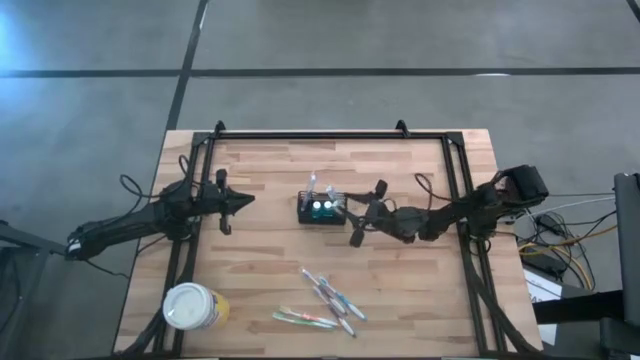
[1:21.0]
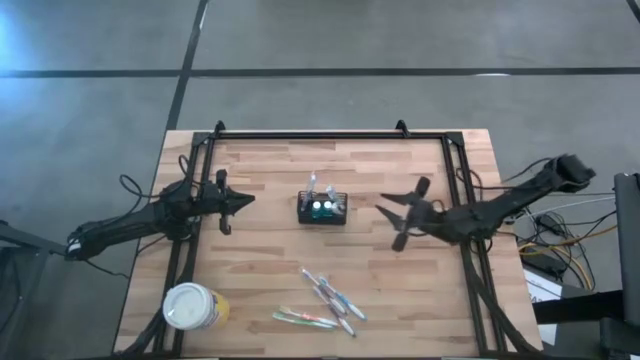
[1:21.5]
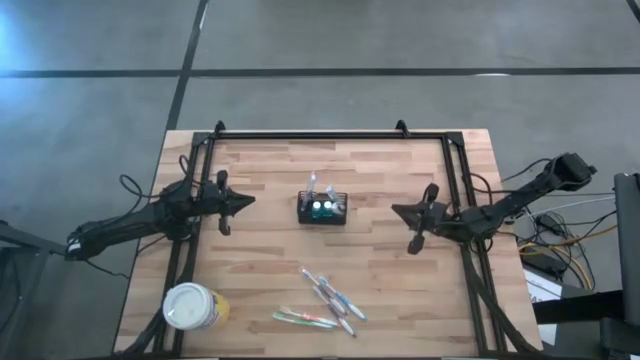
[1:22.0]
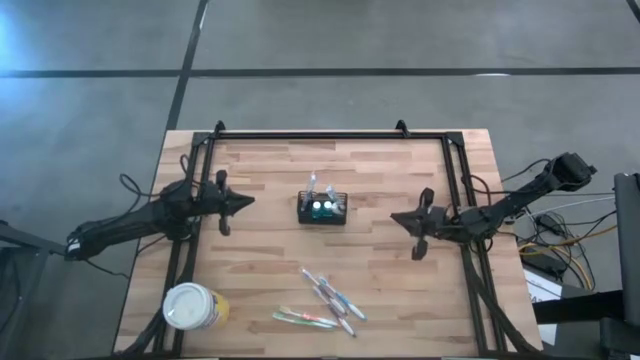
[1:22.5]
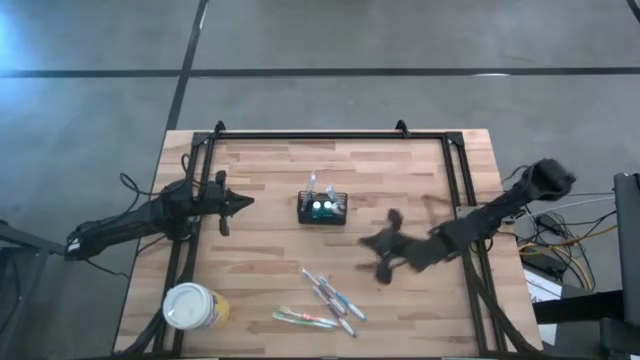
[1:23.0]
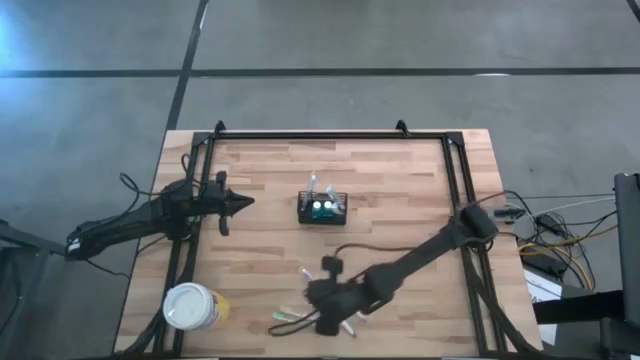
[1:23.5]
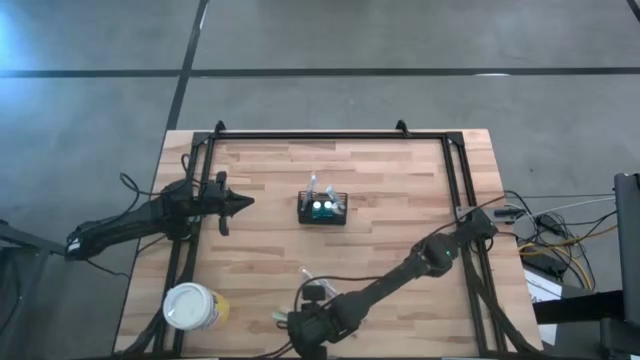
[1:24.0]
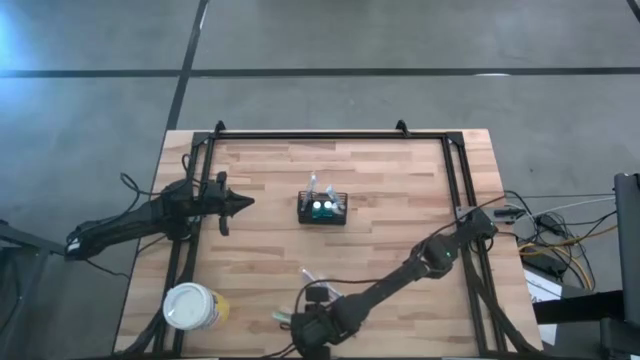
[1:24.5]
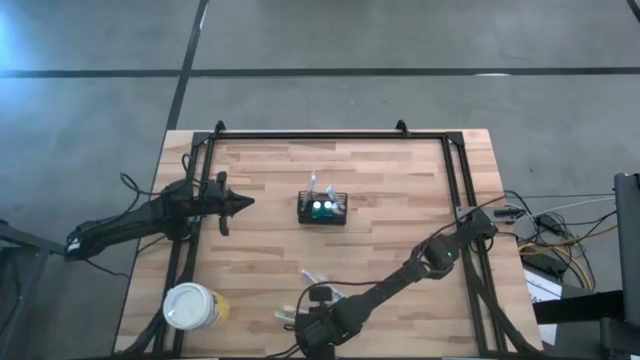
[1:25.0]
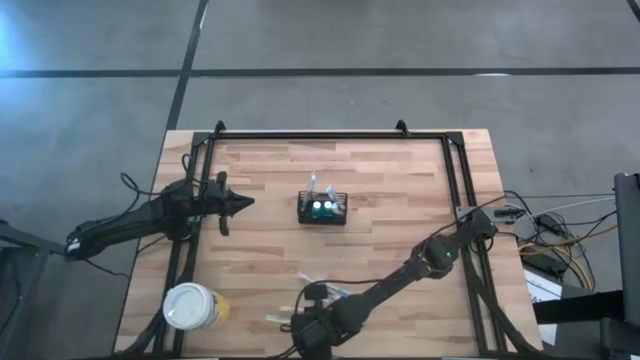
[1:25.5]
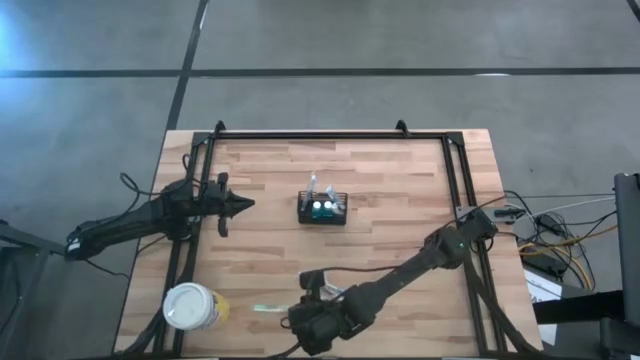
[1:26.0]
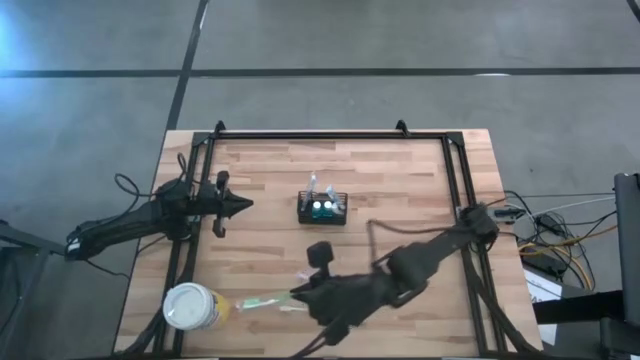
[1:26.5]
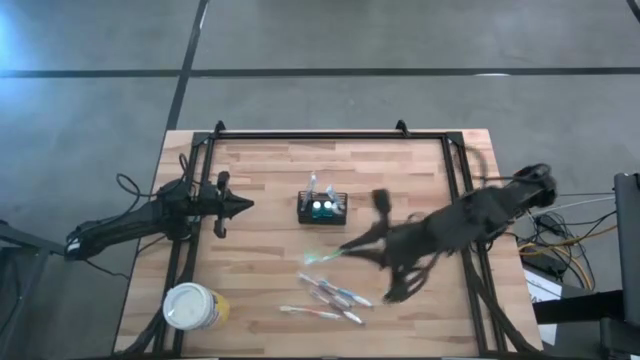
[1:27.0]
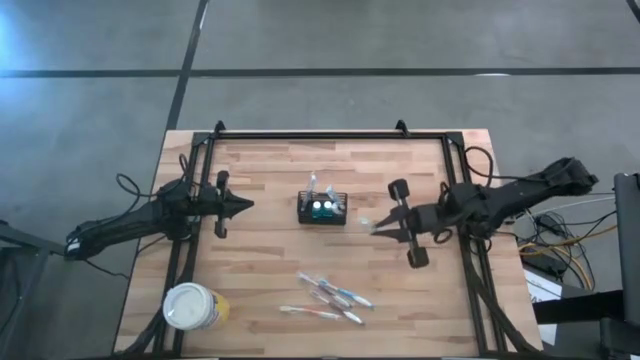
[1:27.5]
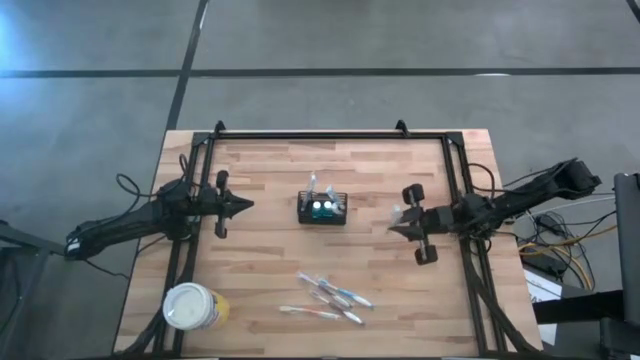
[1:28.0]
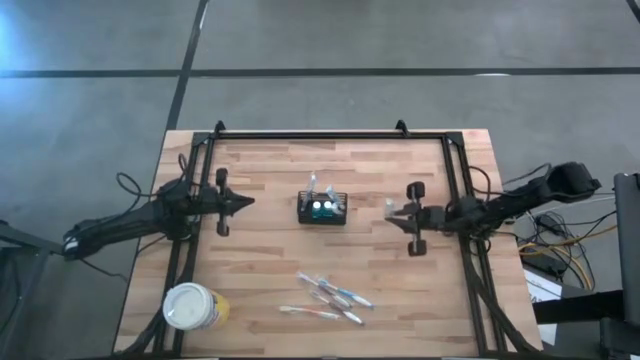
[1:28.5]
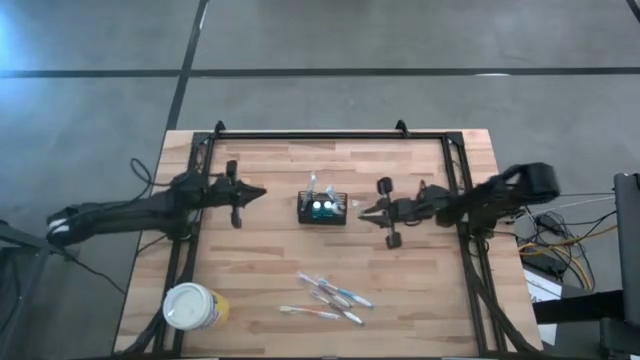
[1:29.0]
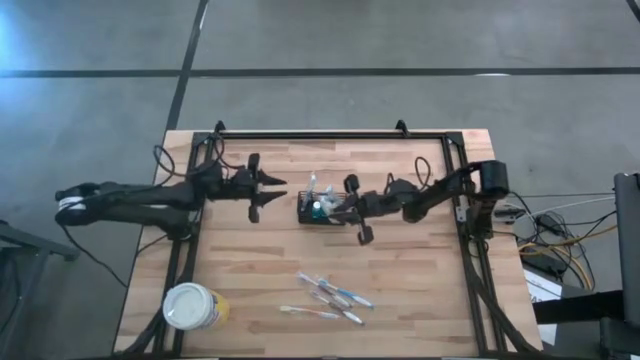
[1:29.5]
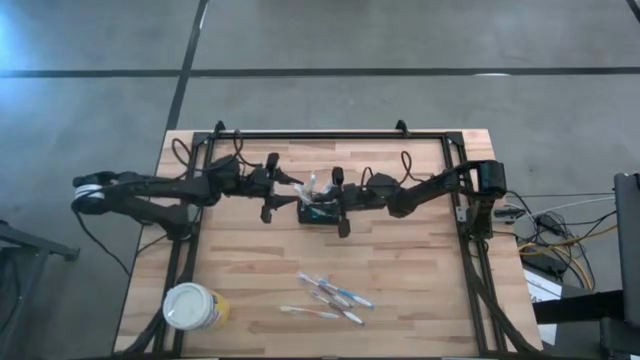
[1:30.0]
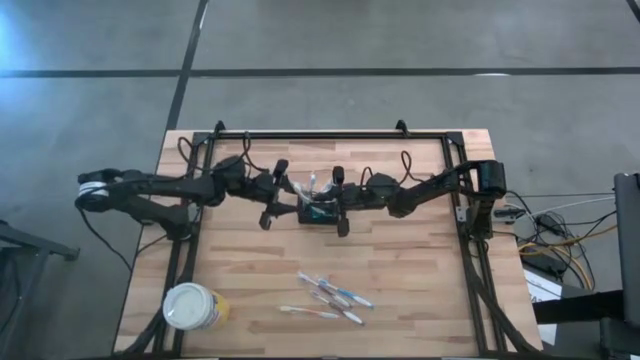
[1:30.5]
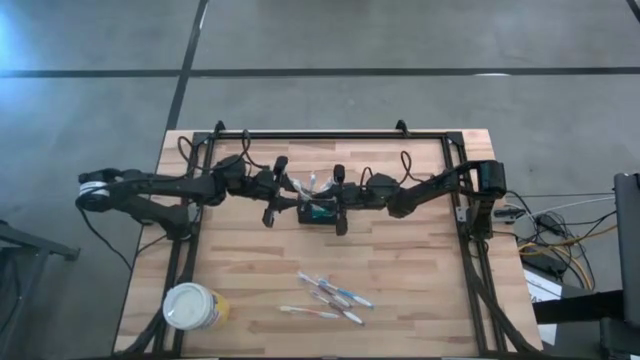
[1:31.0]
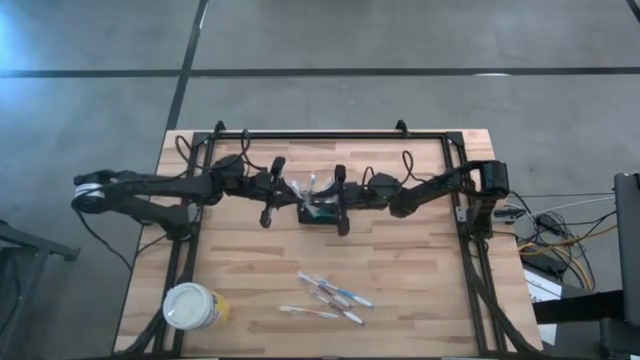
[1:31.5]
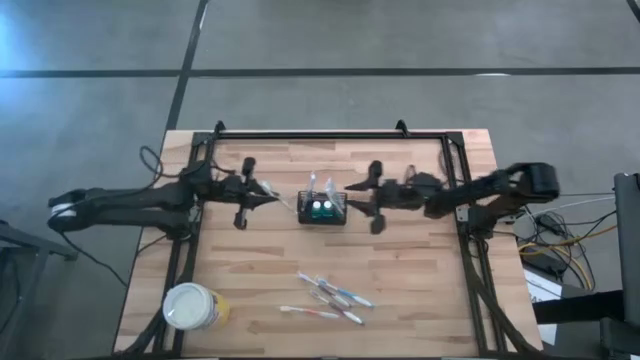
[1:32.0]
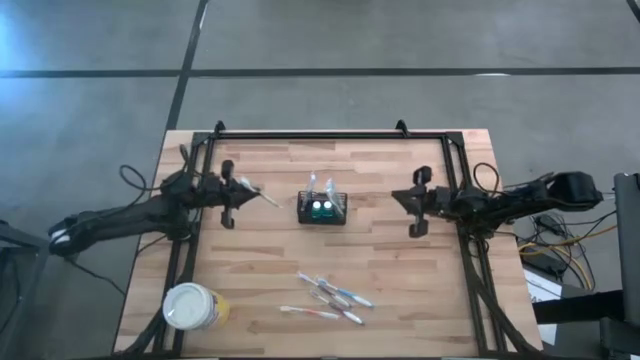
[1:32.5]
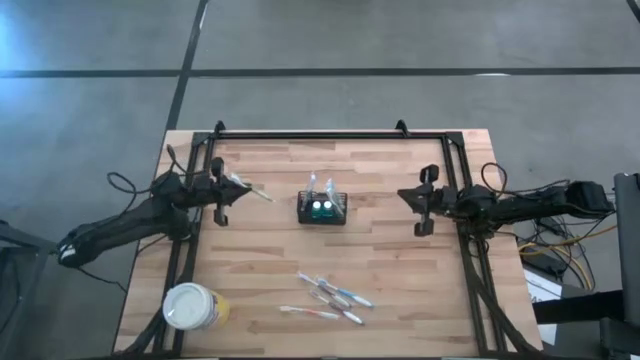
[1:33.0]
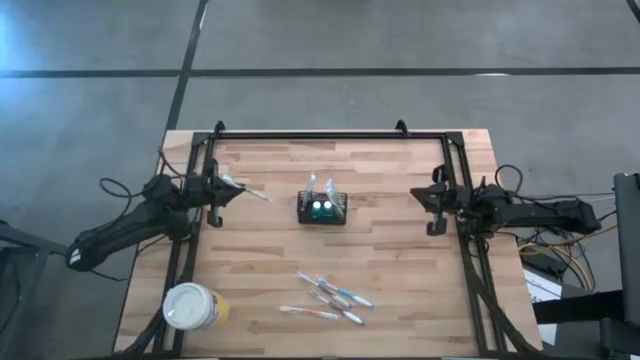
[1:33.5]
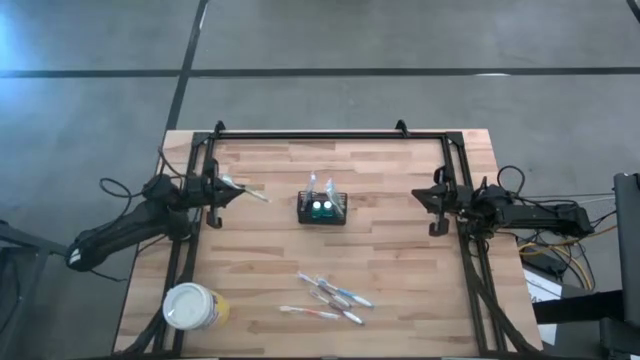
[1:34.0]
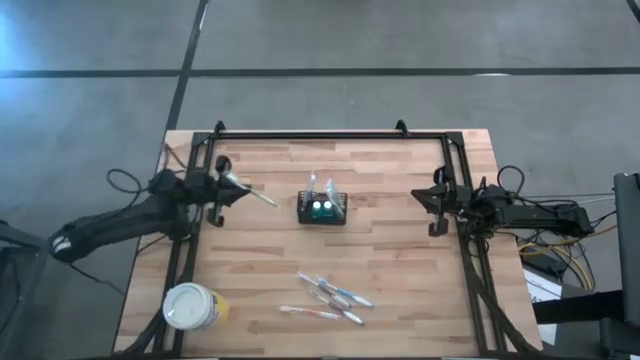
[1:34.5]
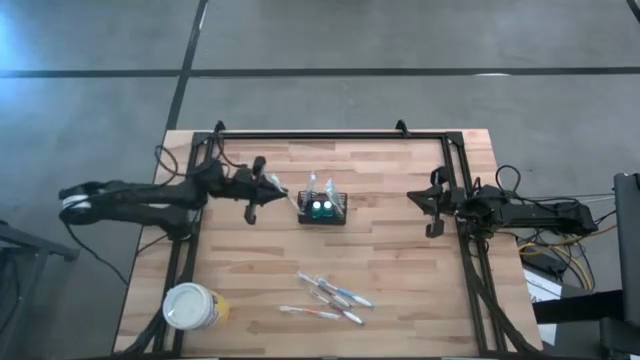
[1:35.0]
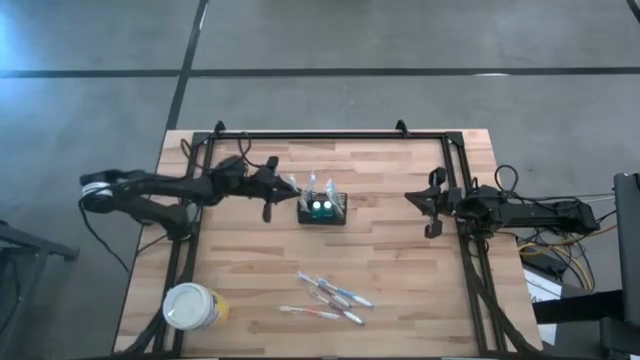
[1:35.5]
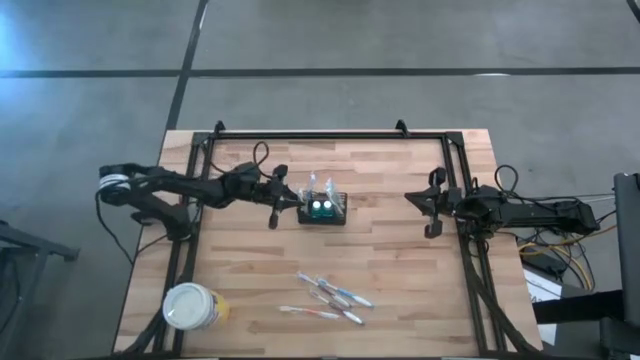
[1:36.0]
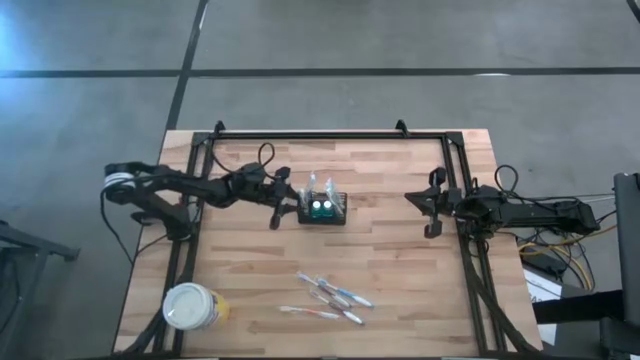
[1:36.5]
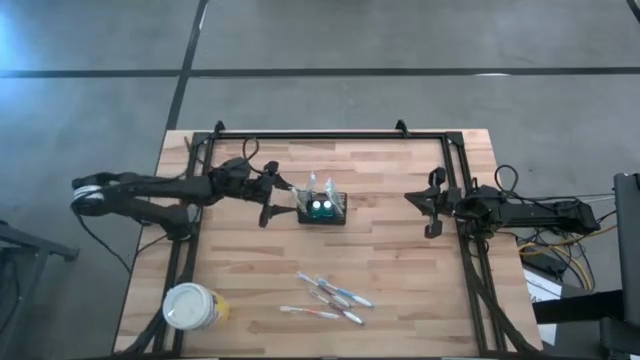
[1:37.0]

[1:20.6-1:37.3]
Task: Pick & Place toothbrushing station
Put the green toothbrush into the wire organizer

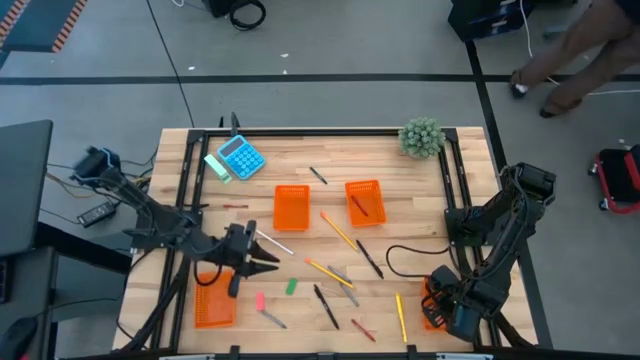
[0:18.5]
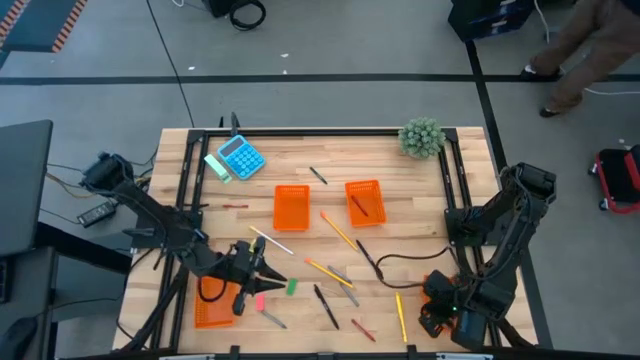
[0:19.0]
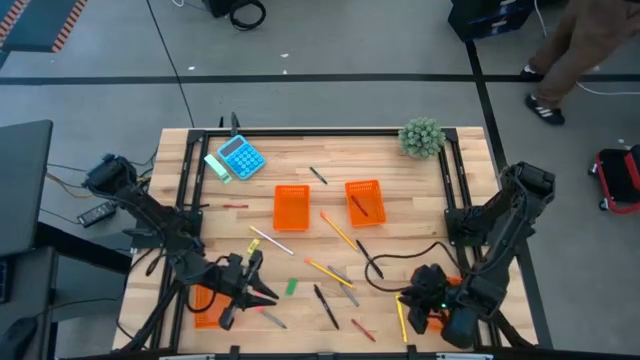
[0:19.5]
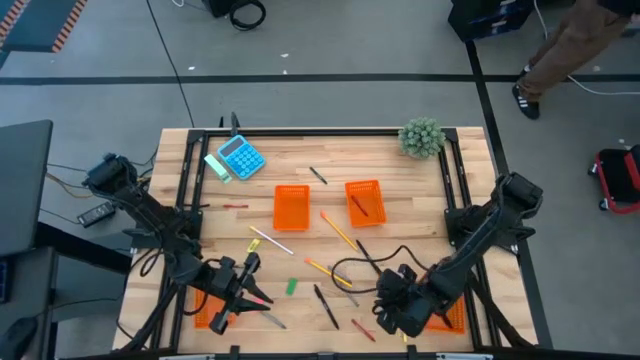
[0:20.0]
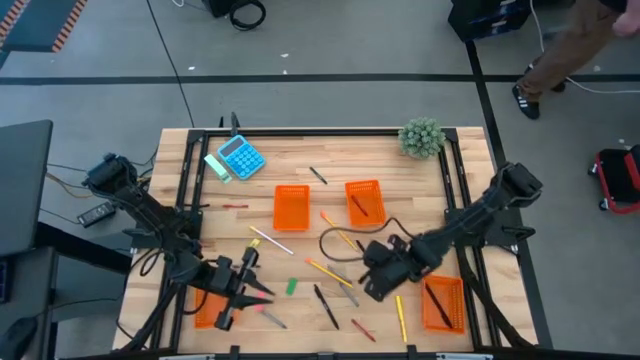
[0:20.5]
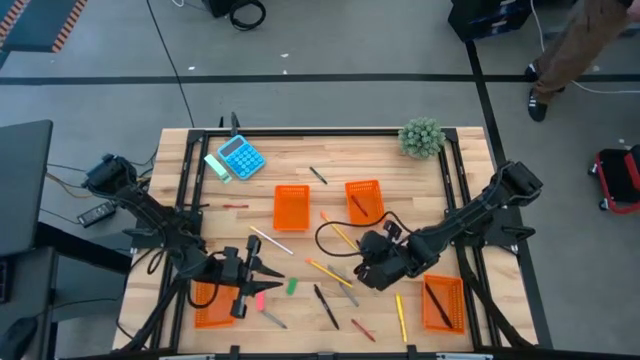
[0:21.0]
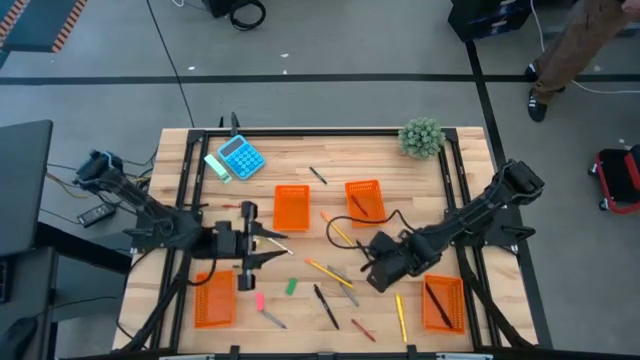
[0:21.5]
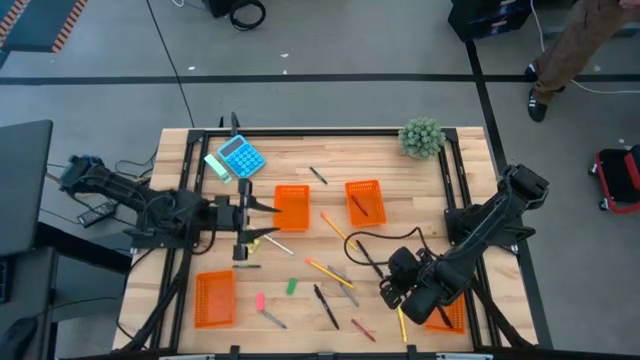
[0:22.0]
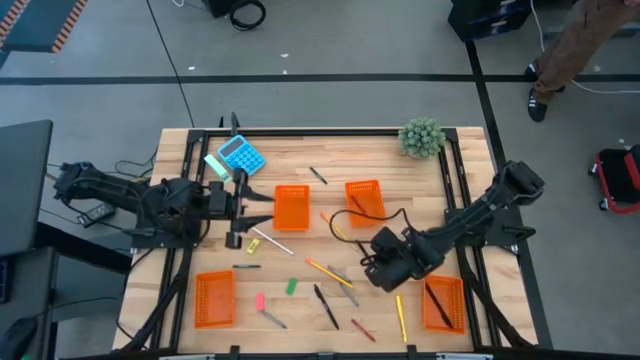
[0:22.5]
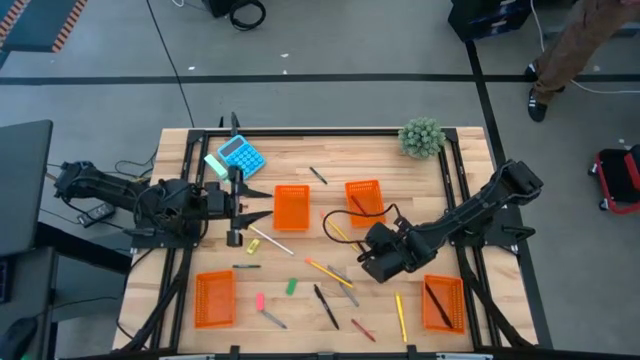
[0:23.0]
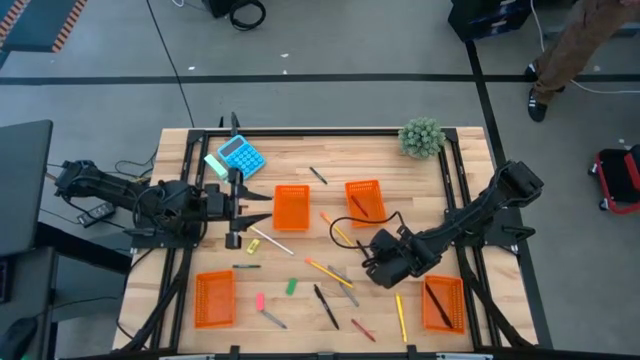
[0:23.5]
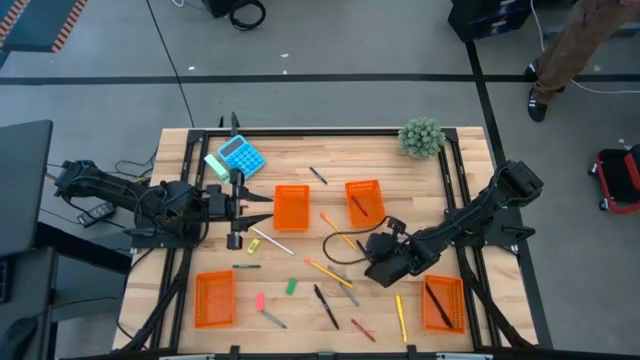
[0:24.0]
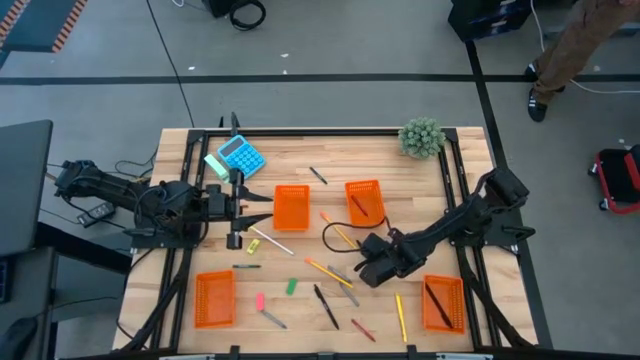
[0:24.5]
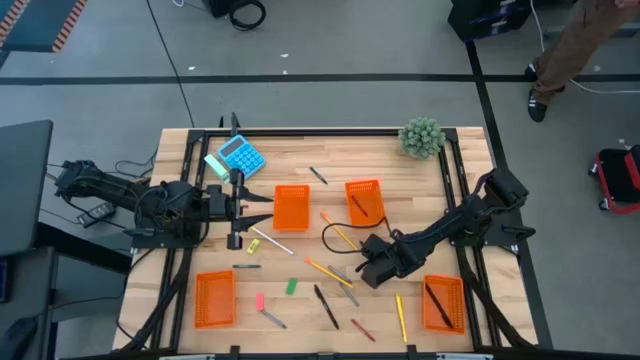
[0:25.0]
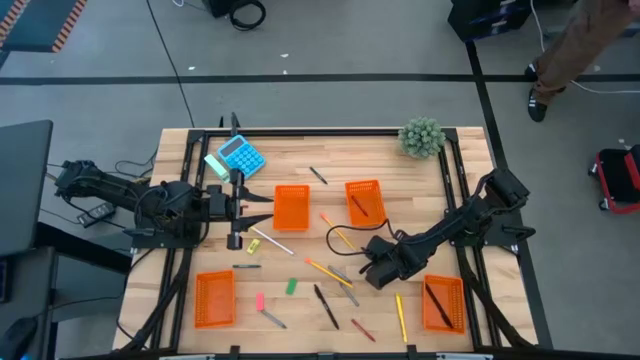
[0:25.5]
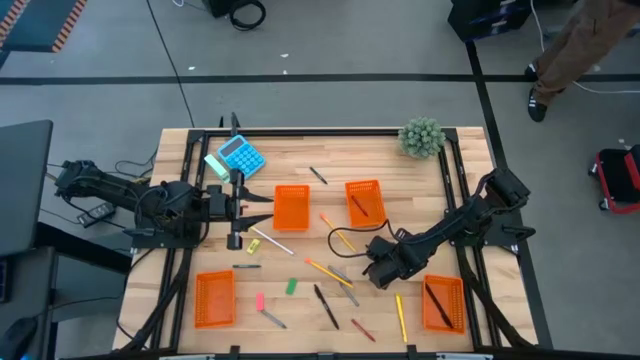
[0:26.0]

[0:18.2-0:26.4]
Task: Sort crayons/erasers/pens/pencils in bins
Put the top black pen into the bottom right orange bin
